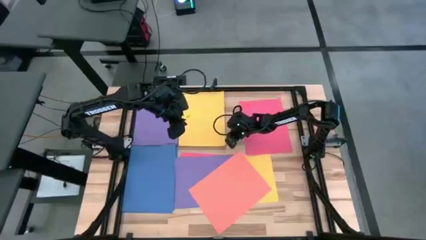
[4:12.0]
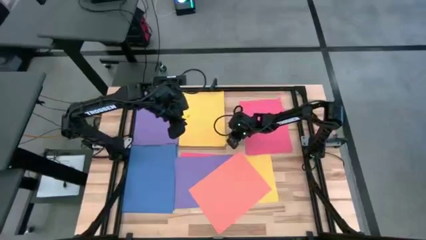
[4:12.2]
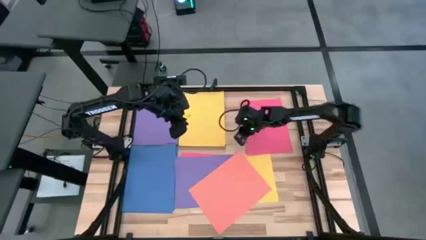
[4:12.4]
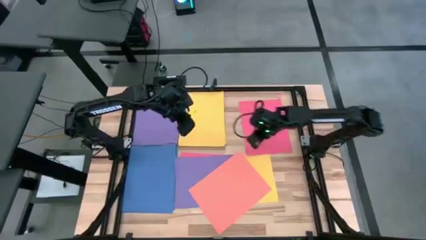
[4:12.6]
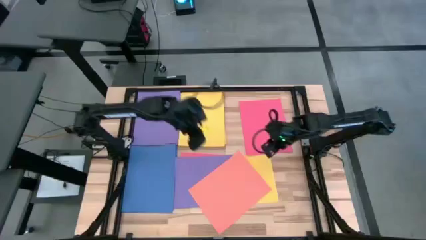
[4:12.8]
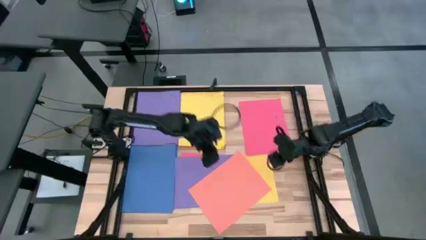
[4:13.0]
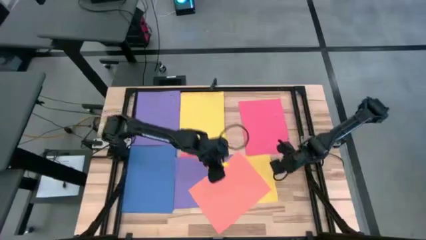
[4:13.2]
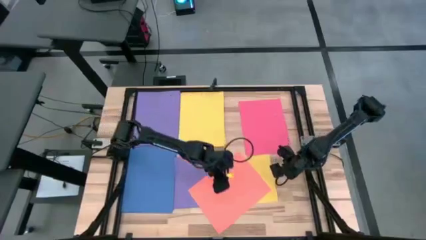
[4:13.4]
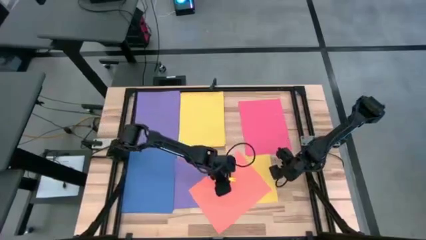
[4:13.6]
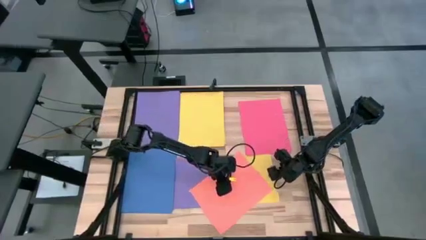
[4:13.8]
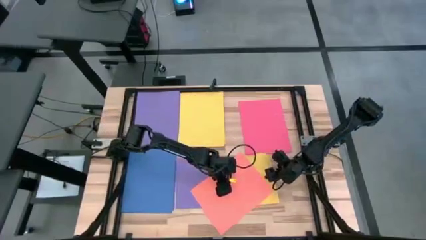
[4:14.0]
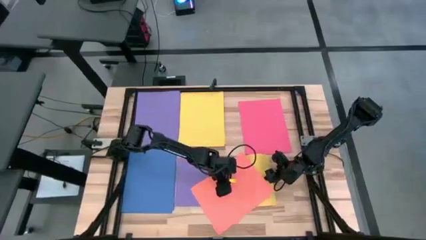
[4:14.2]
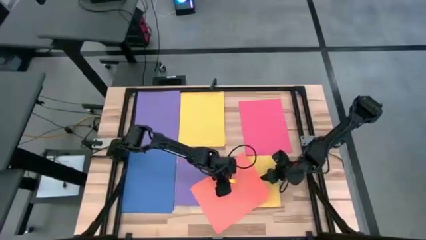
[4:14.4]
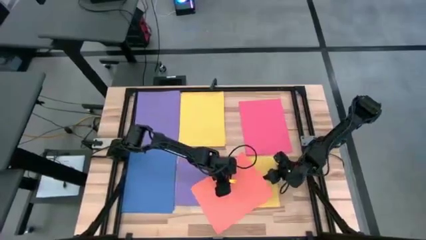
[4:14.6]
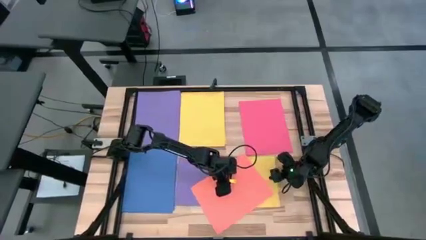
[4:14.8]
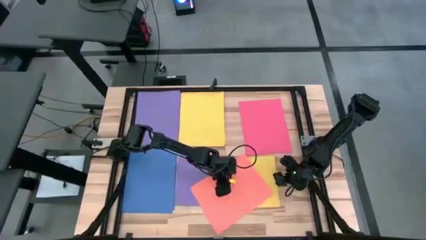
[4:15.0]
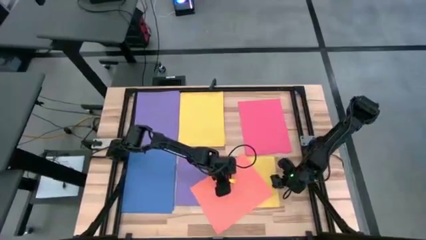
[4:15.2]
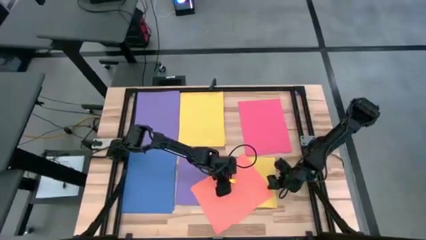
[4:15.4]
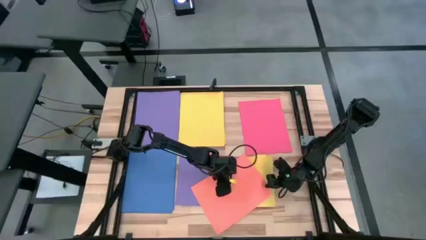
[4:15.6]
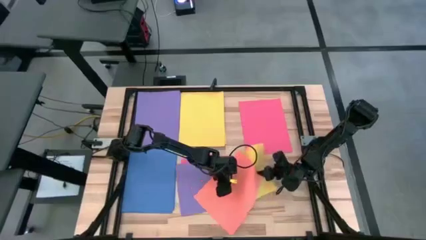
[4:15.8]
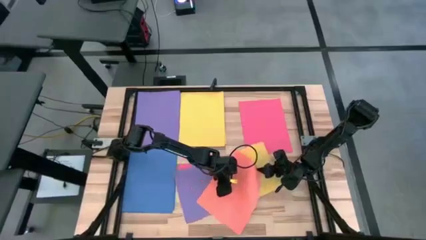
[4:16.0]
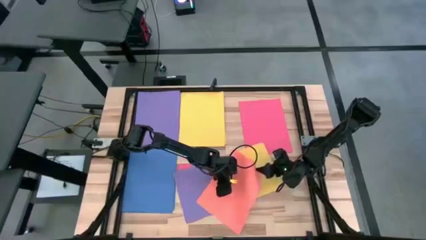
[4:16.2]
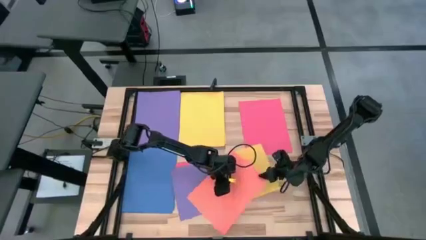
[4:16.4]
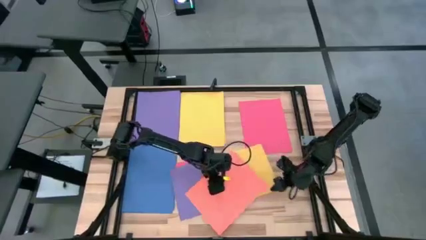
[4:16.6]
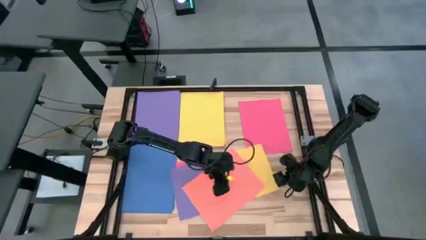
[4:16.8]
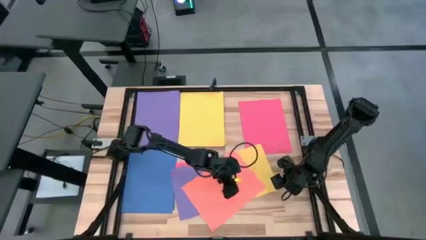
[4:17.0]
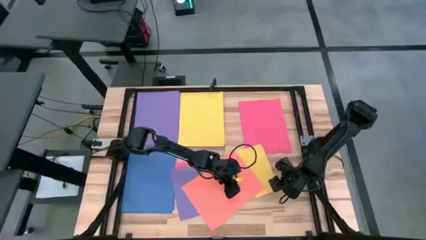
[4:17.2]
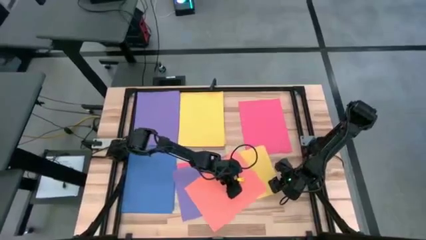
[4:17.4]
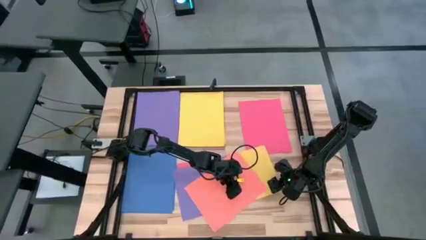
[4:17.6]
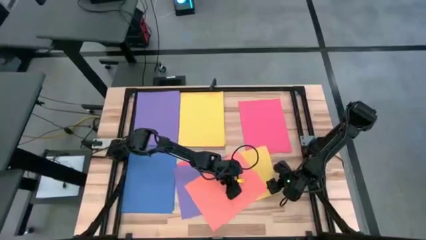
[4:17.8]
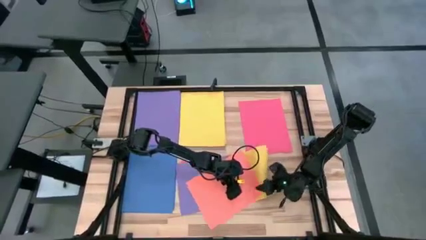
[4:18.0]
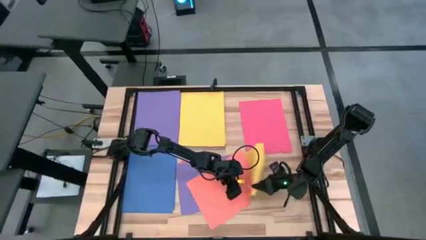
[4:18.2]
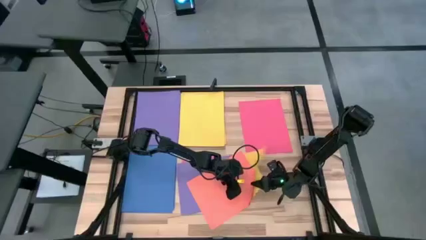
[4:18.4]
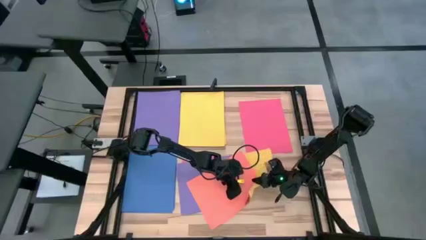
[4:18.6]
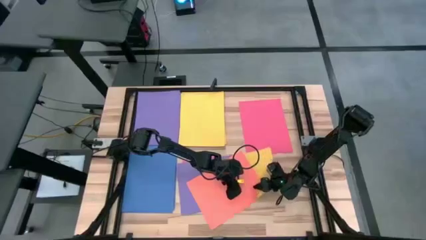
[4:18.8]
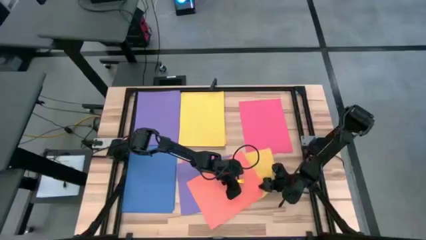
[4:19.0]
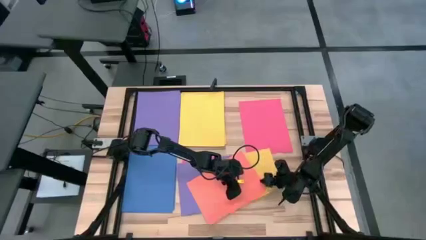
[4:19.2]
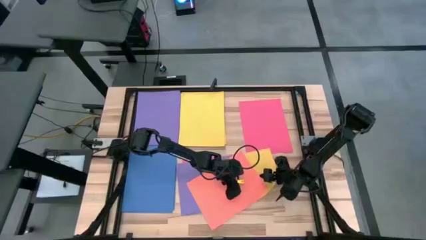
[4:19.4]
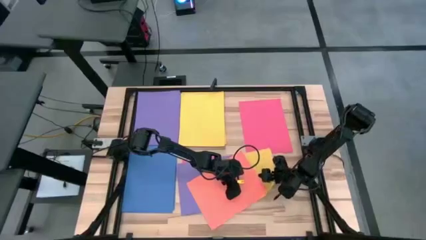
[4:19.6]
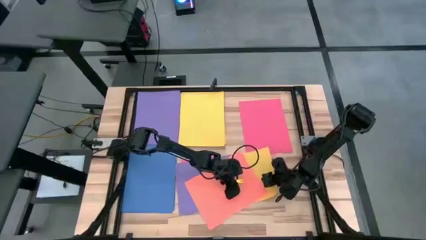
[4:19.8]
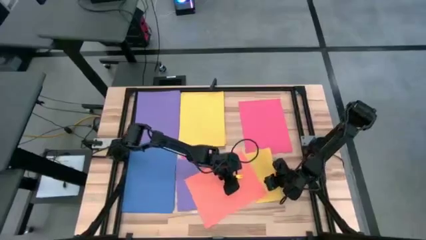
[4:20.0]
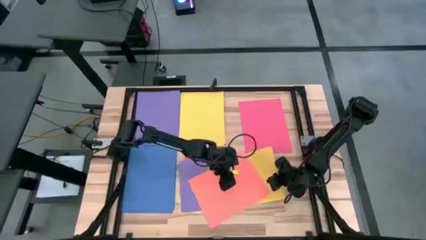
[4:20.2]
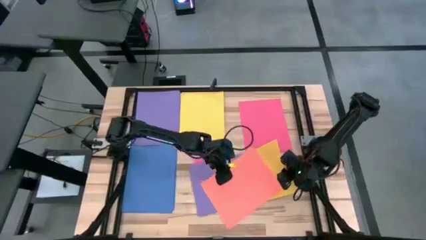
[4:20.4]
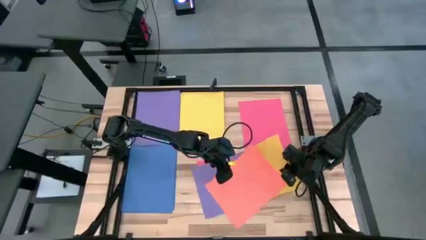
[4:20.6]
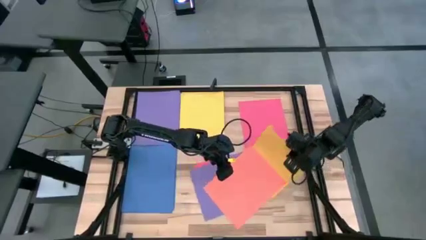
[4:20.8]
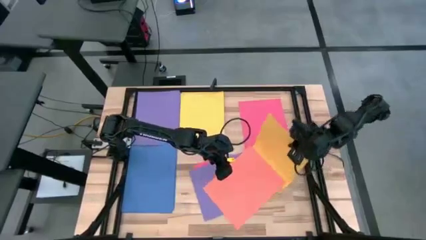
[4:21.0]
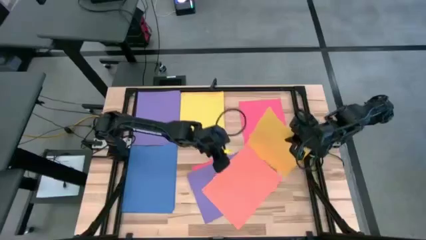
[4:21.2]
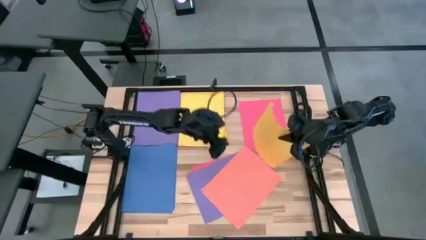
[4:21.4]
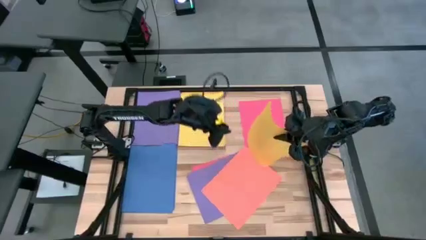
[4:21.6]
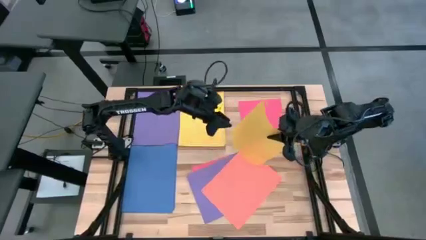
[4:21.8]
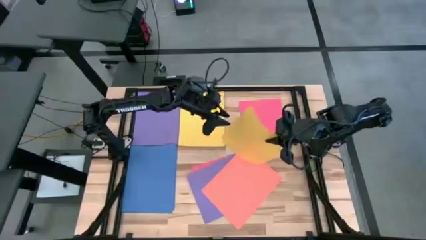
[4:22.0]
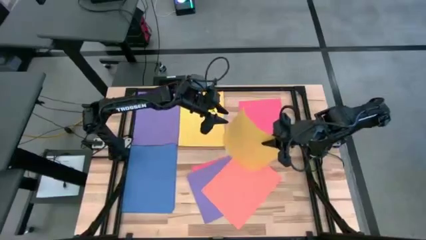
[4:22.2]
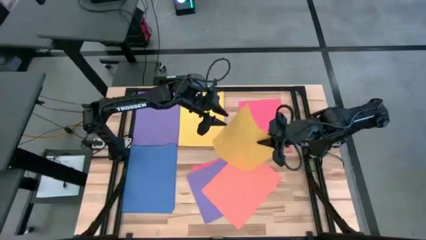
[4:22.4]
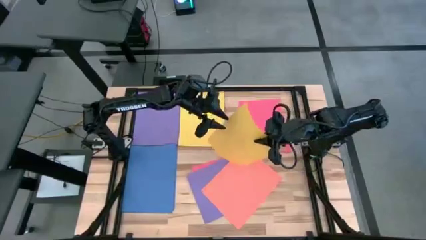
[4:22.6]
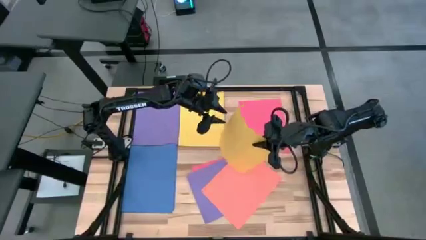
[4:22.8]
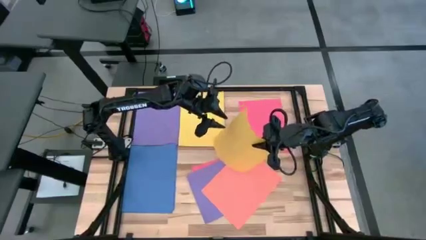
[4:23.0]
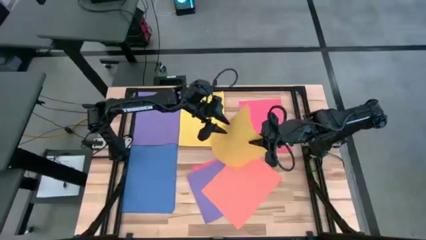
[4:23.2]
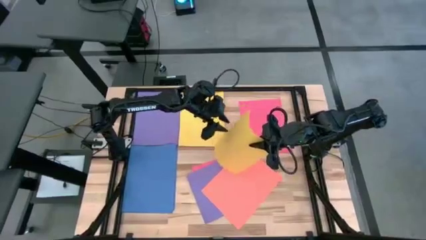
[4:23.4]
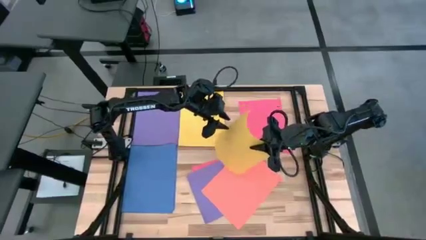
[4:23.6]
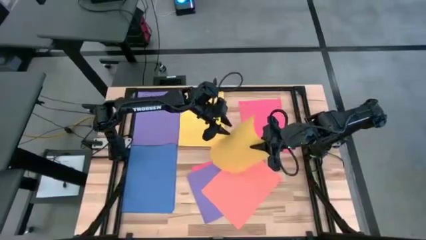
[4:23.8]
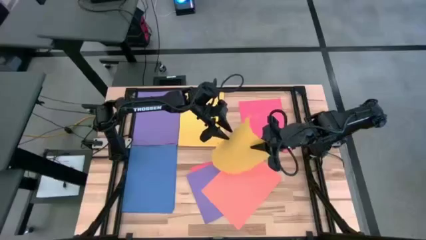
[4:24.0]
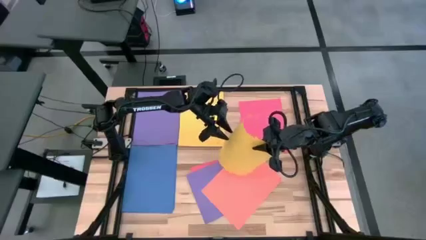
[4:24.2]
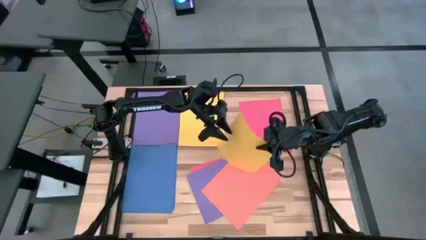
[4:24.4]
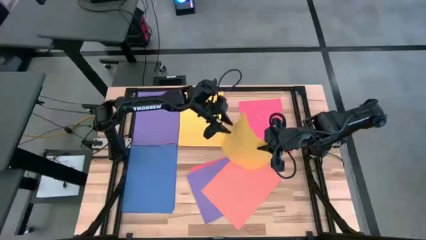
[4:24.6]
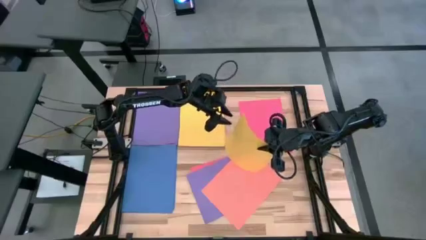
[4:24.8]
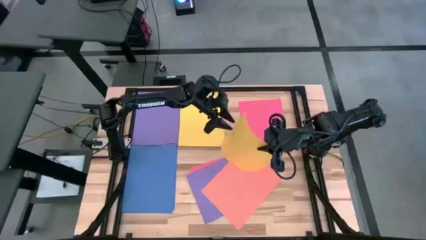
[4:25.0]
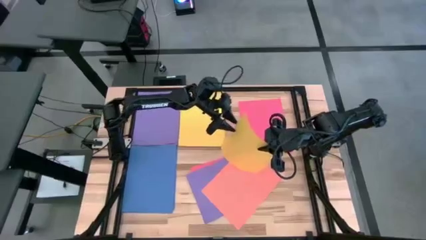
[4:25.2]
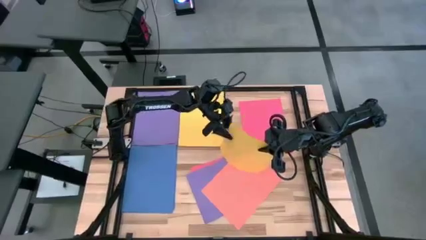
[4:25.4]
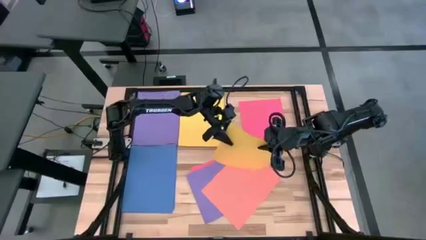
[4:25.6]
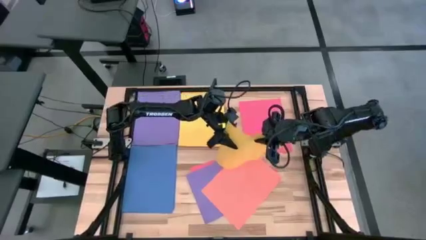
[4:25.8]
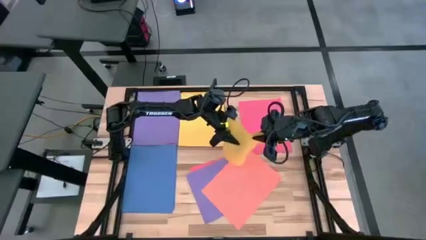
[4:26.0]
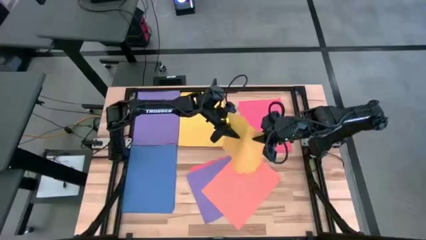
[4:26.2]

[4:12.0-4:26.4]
Task: Organize paper
Stack the yellow paper on top of the yellow paper

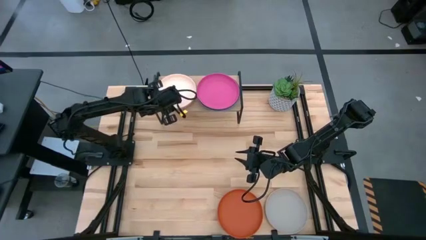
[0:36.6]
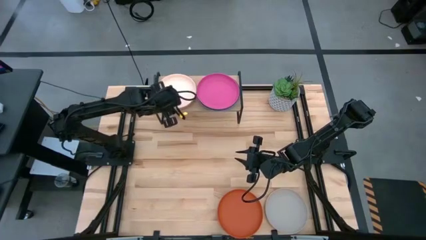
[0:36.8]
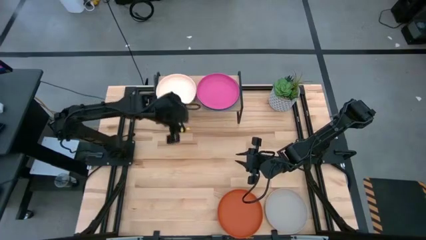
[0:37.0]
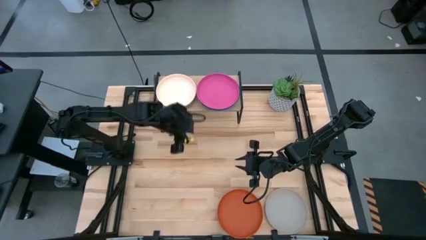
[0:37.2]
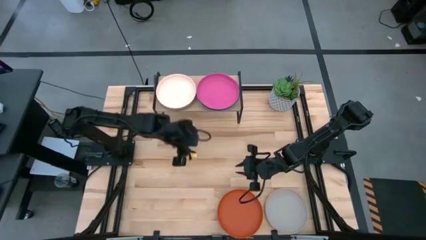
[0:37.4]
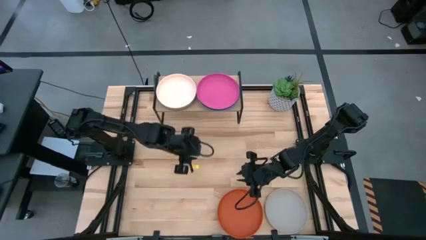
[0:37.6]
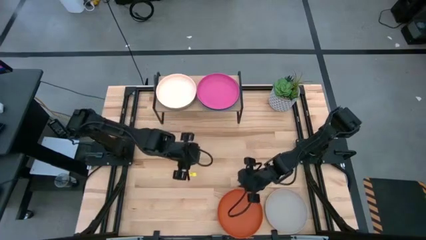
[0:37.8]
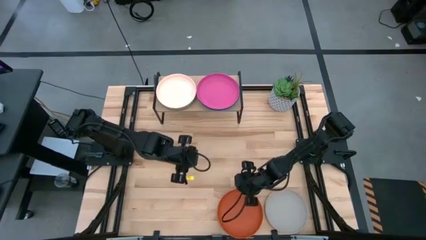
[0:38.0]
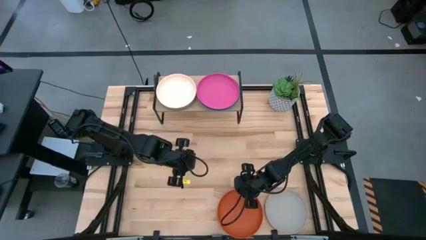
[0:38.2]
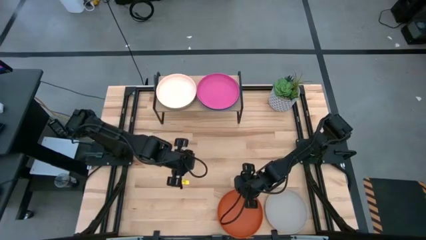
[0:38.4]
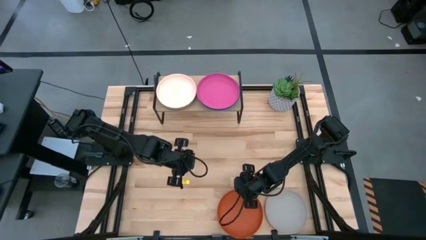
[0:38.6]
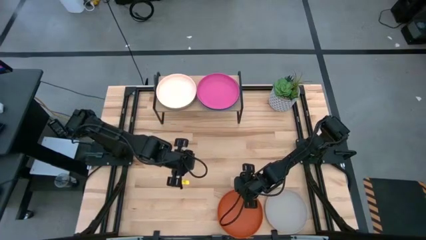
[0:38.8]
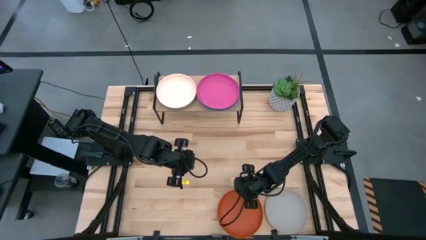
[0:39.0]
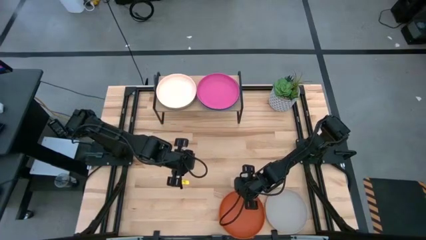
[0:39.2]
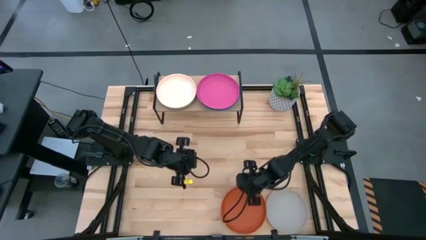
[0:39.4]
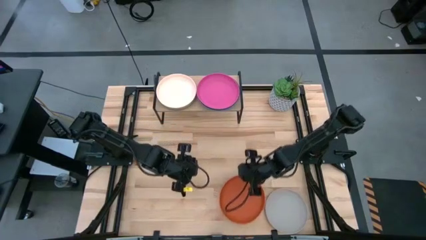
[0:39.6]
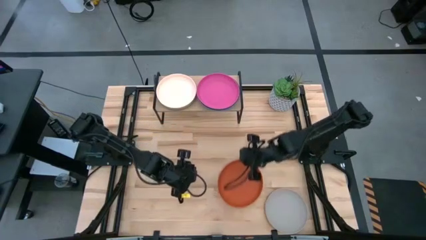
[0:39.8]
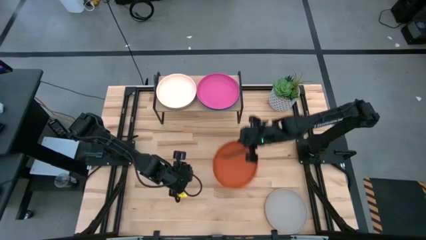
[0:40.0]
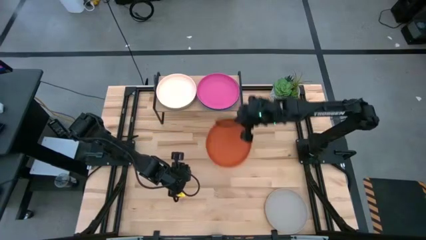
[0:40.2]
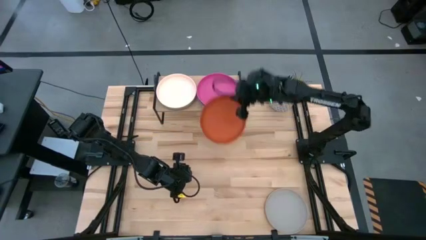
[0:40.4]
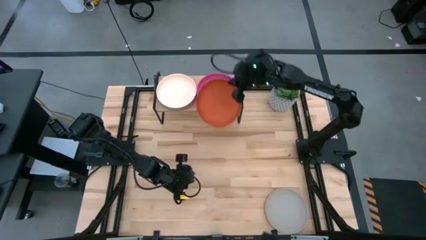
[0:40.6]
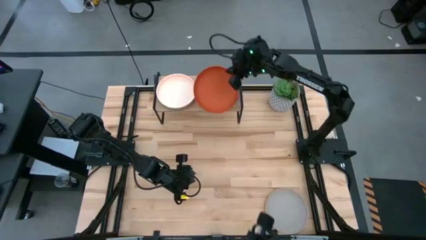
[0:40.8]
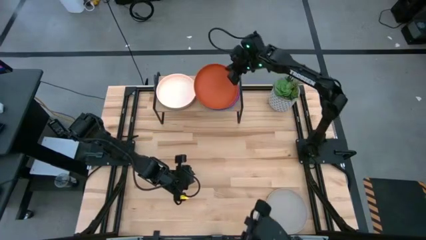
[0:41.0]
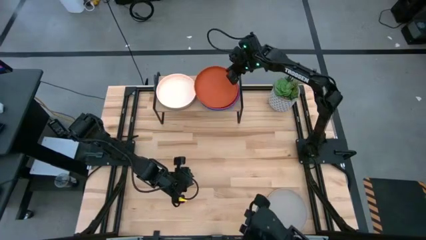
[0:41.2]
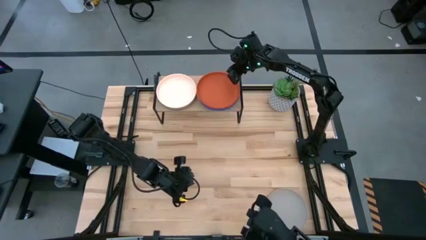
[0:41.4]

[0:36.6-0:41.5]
Task: Place and stack plates onto a shelf
Stack the orange plate on top of the pink plate on the shelf
